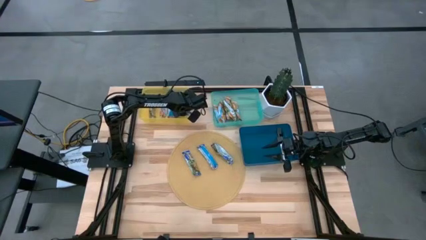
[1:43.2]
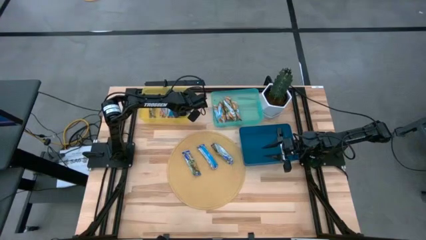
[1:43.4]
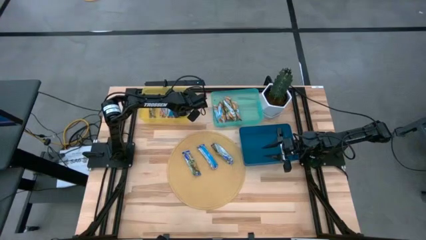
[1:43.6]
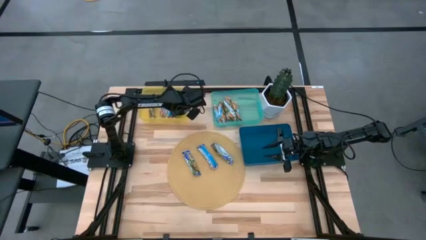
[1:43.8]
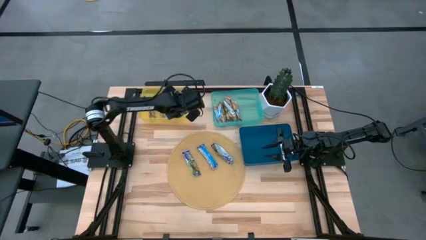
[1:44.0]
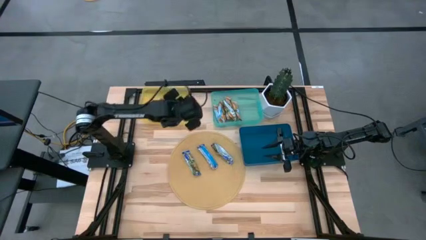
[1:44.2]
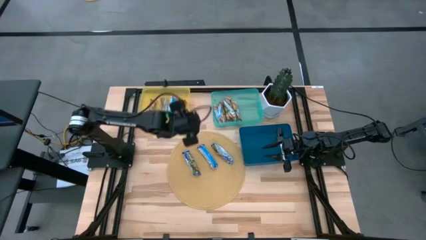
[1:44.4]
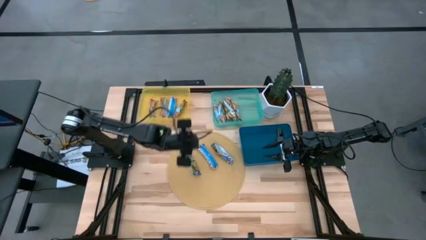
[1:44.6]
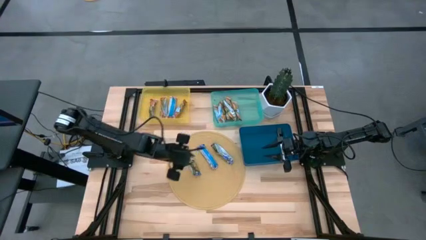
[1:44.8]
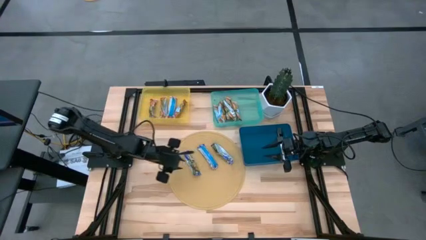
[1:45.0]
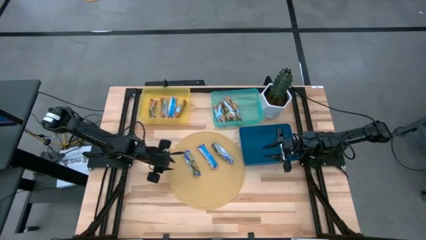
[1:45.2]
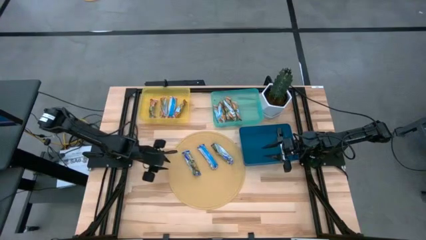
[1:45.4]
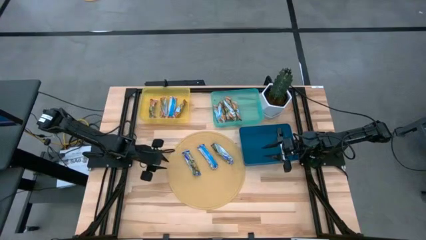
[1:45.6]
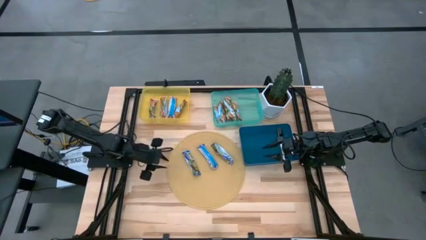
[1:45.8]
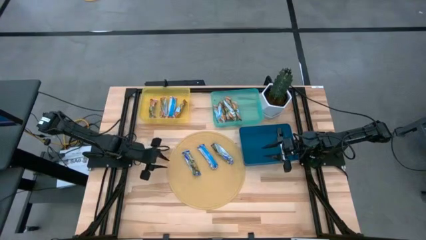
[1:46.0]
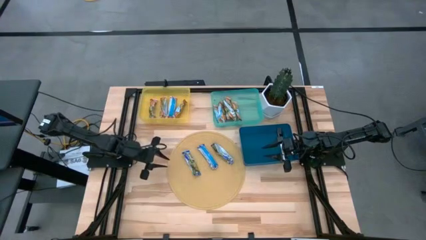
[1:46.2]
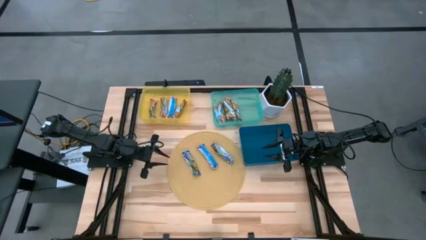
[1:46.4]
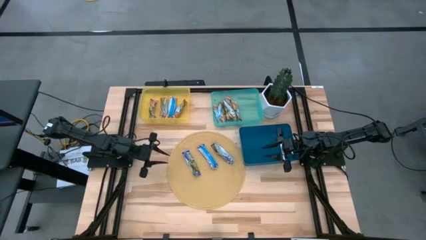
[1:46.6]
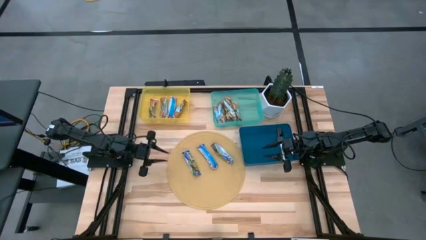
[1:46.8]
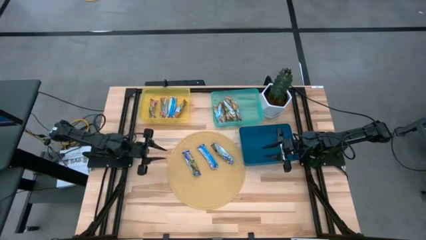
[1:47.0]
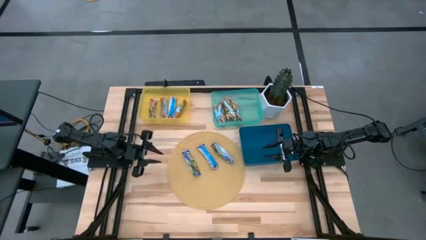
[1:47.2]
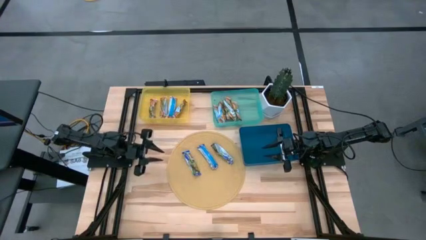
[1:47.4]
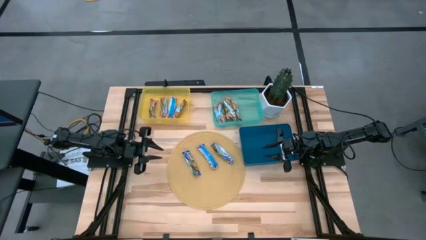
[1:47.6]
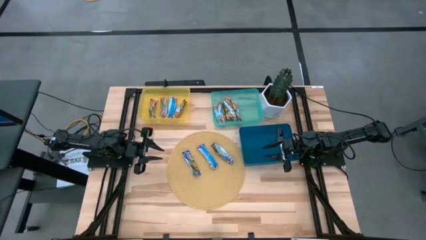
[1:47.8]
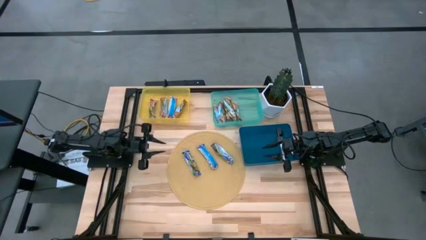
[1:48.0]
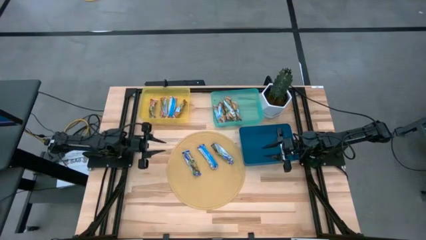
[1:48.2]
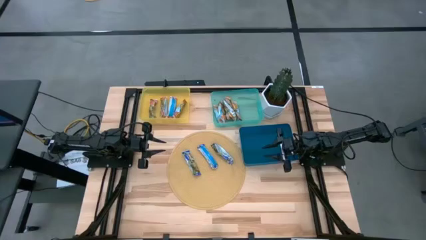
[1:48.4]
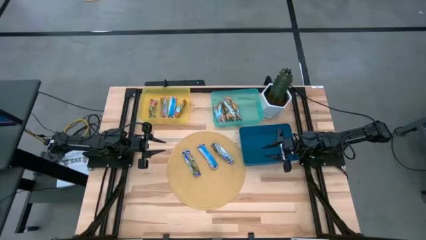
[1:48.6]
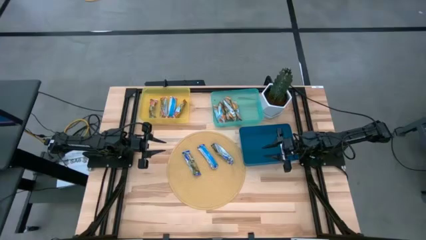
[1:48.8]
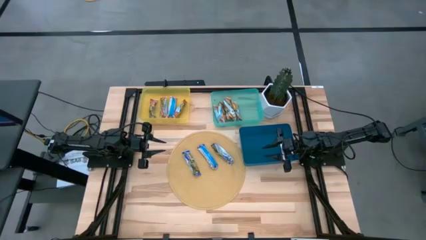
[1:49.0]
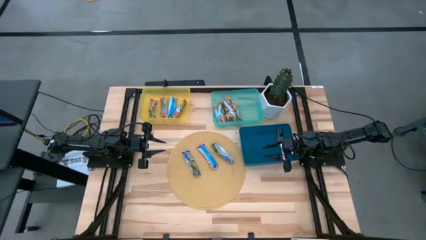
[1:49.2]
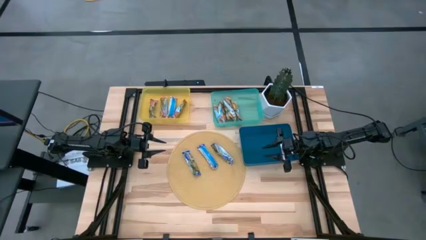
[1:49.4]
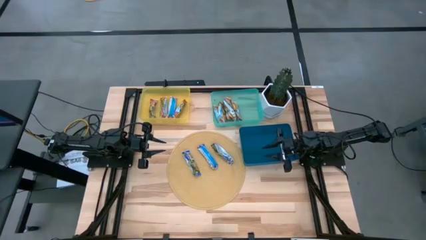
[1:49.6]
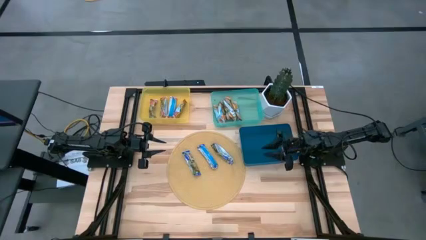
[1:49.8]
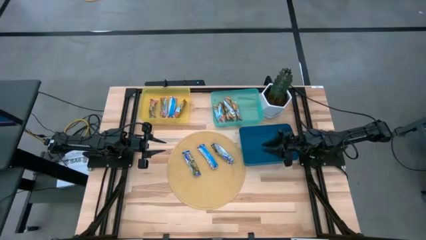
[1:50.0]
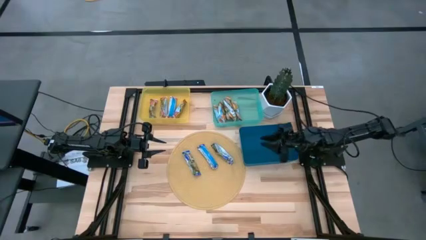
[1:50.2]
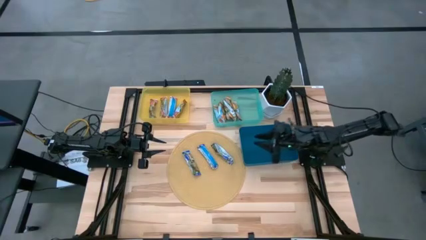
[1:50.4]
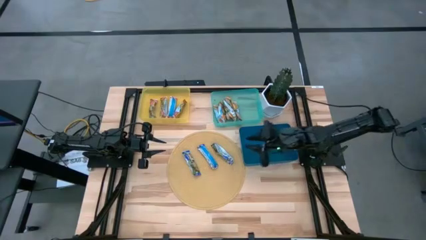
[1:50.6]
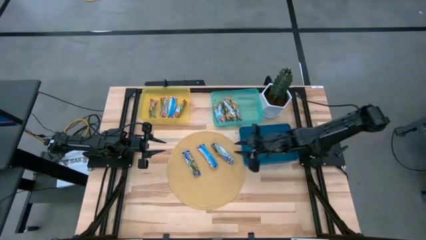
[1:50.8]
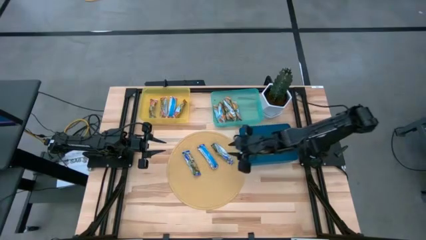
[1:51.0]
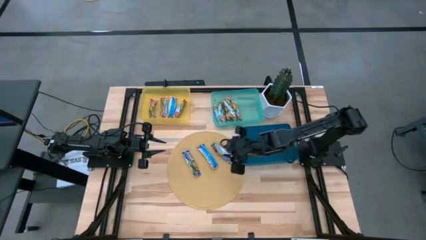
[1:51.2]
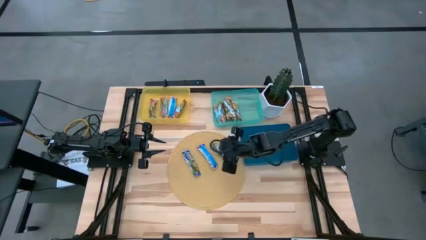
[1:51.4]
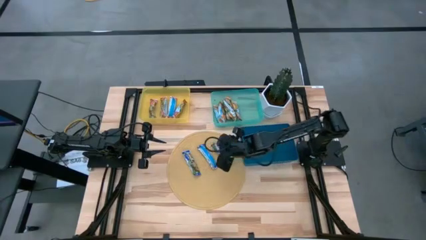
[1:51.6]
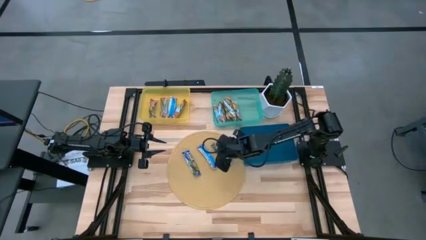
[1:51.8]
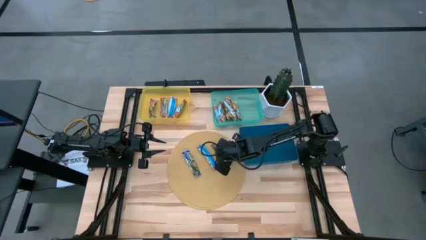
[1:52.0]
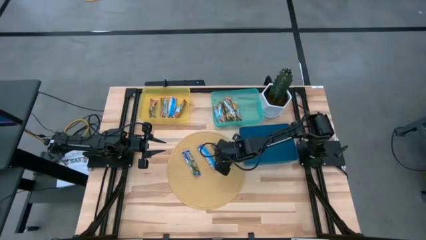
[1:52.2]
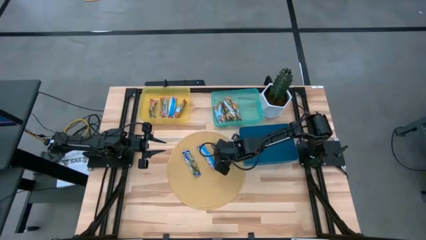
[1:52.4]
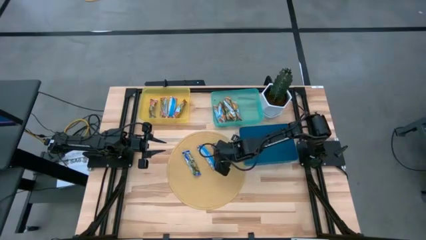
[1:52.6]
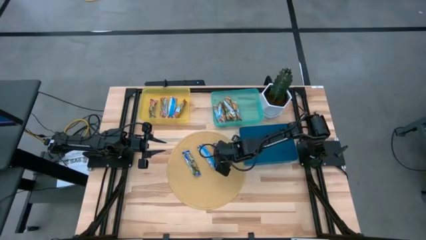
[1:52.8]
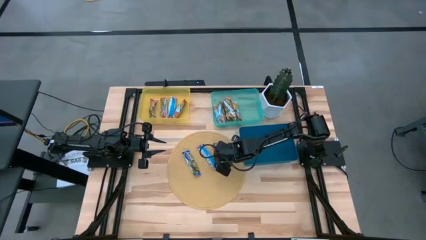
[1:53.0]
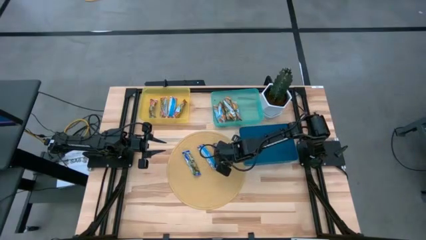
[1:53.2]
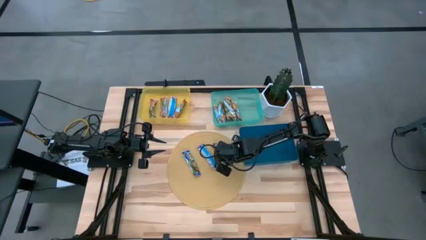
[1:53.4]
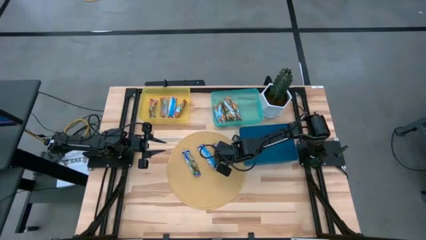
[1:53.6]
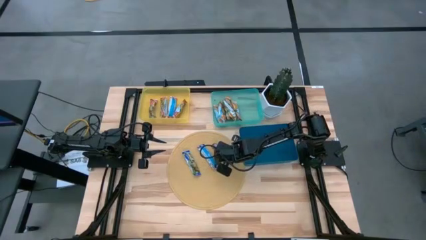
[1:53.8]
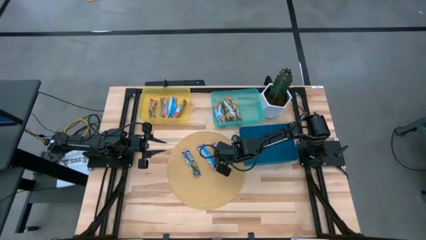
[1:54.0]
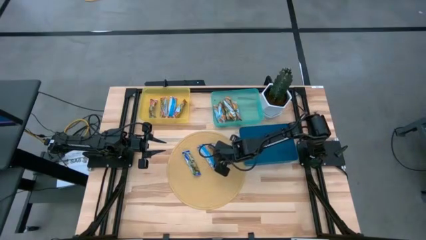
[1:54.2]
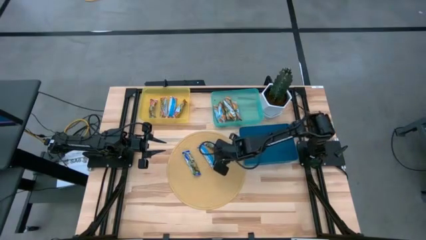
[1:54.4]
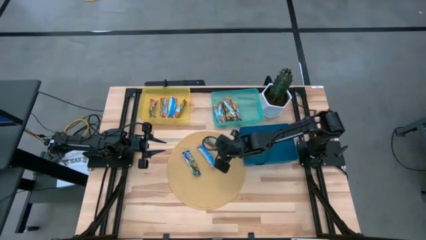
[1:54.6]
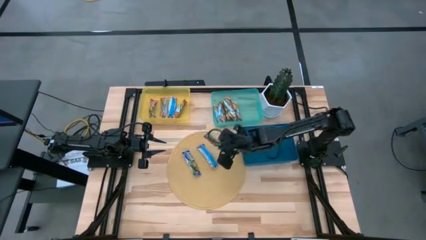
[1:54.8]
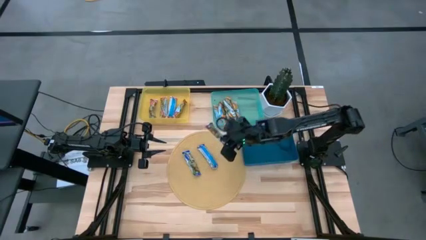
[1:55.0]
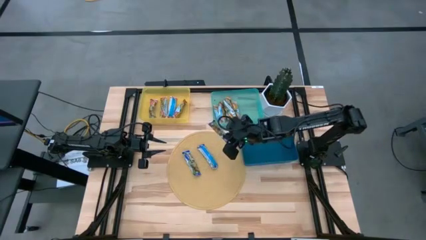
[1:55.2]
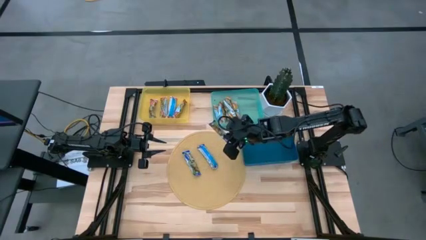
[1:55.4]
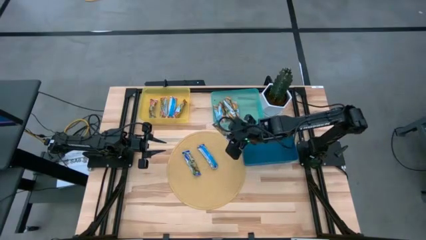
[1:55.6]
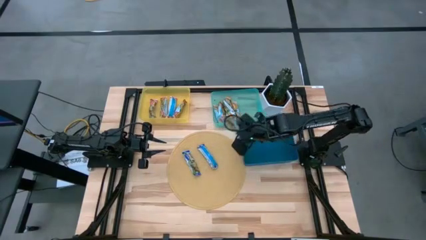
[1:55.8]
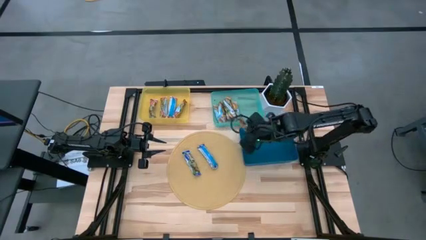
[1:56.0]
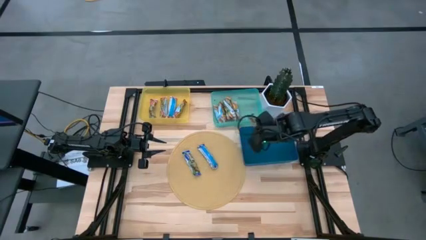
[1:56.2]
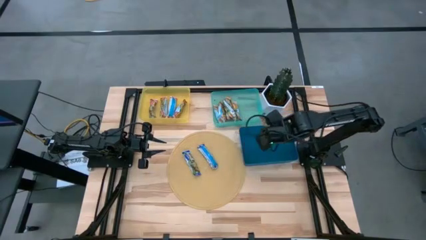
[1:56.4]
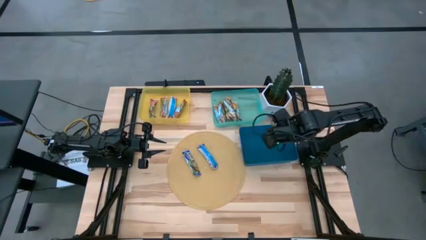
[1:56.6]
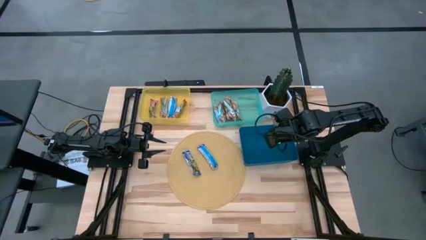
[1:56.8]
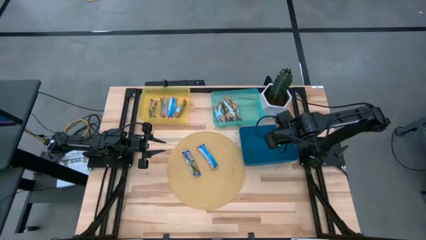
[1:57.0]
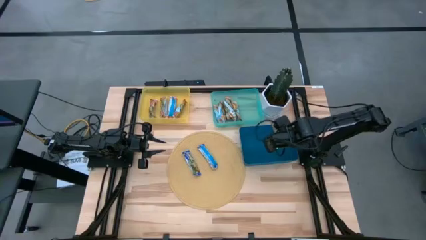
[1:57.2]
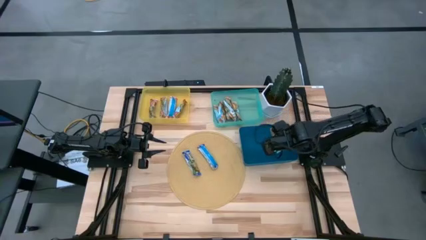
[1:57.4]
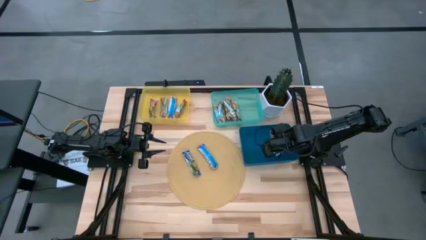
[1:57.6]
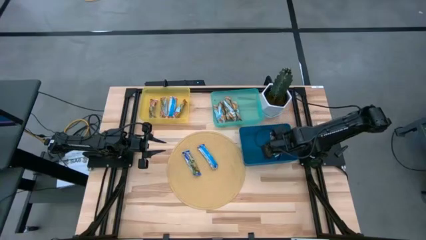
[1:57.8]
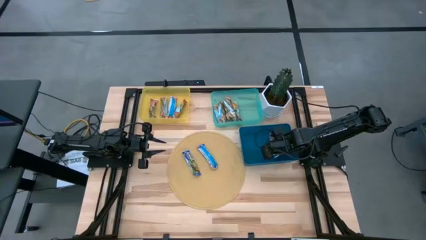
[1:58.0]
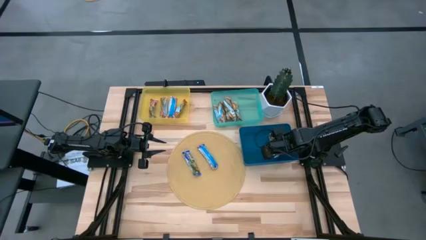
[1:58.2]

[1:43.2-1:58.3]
Task: Pick and place Granola Bars by type
Put the blue granola bar into the blue bin

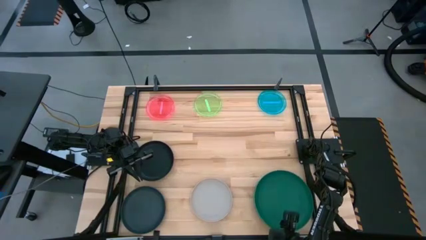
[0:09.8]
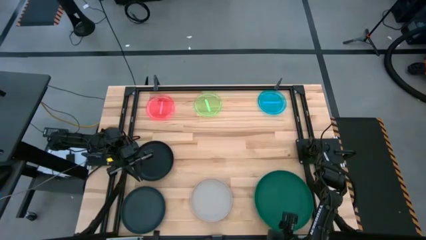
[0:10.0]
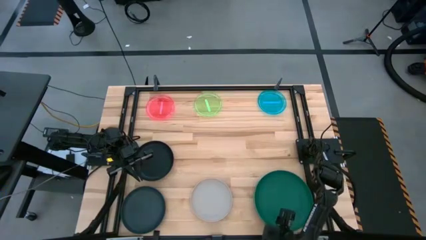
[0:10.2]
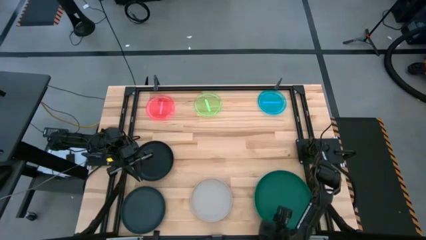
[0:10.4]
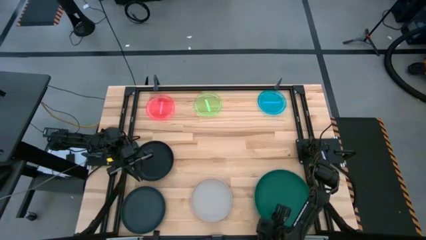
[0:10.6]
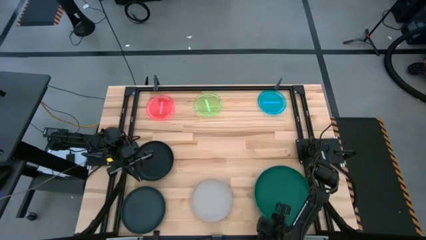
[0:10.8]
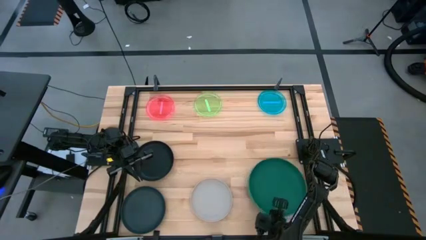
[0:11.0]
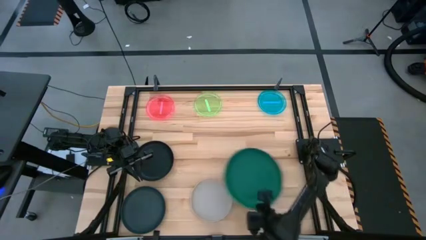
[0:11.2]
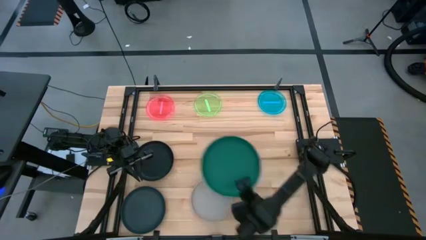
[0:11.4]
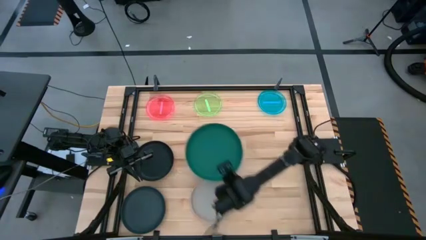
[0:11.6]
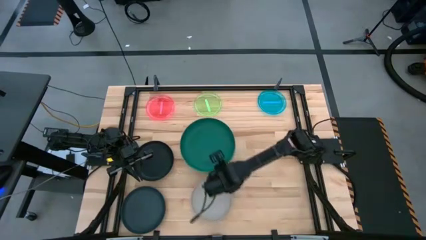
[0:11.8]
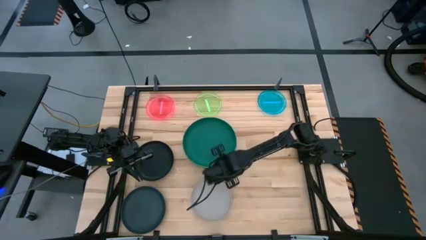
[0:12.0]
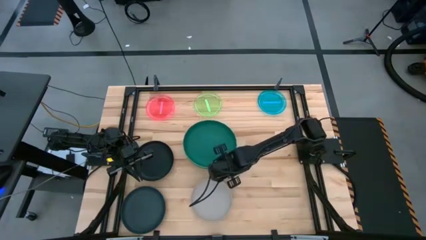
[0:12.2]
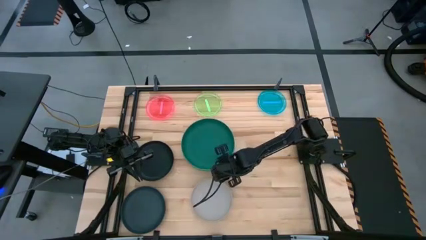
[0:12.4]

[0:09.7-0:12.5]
Task: Stack plastic plates
Move the stacked plates to the center of the table
